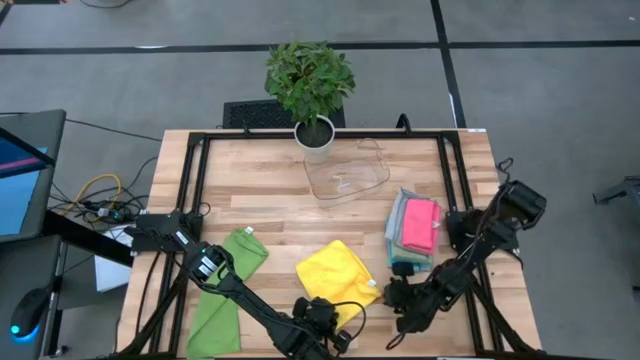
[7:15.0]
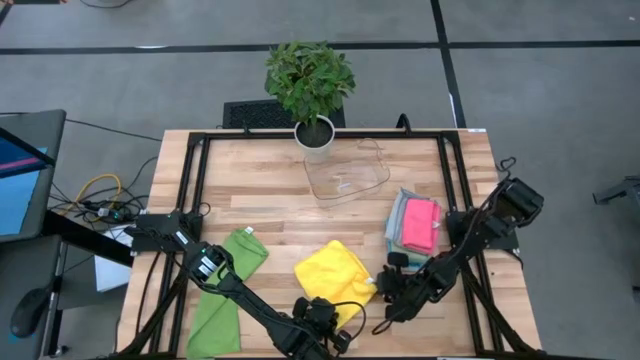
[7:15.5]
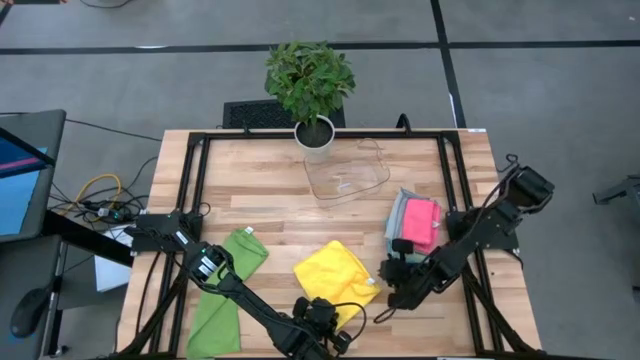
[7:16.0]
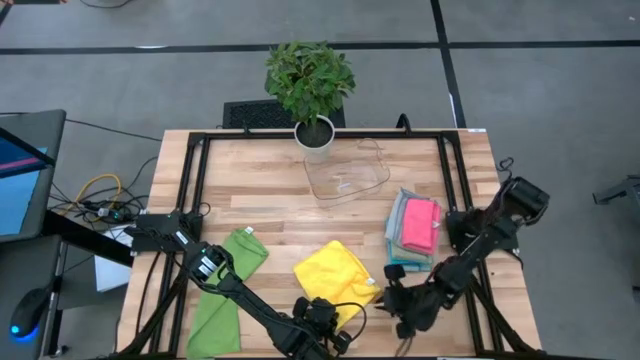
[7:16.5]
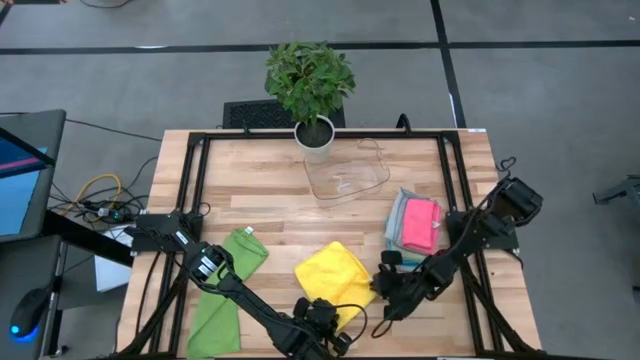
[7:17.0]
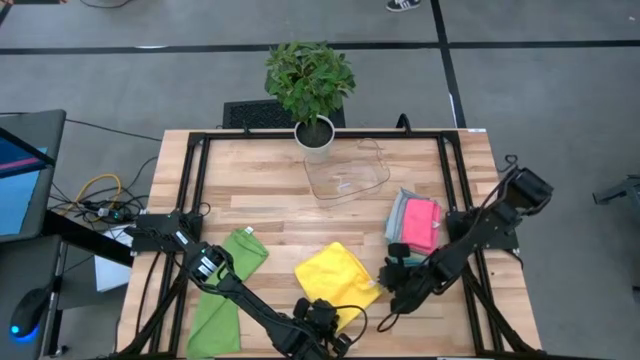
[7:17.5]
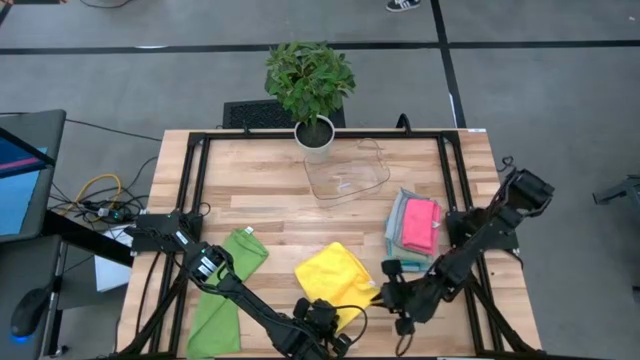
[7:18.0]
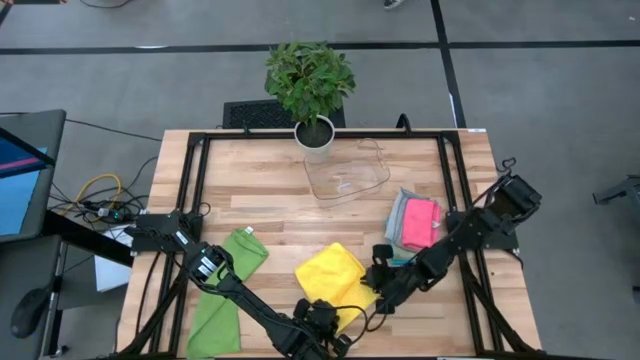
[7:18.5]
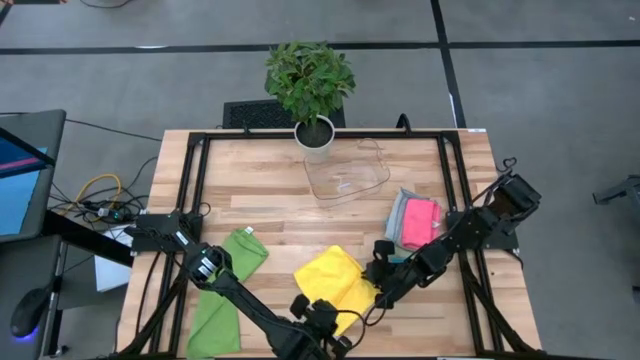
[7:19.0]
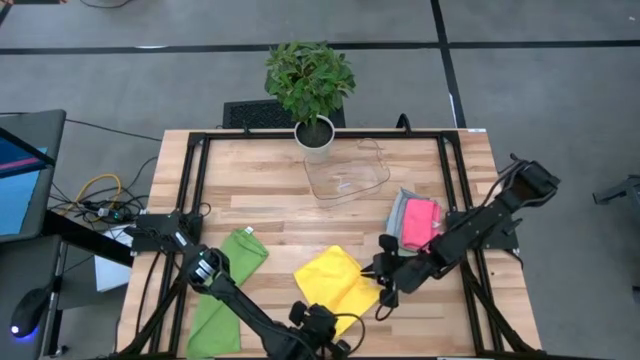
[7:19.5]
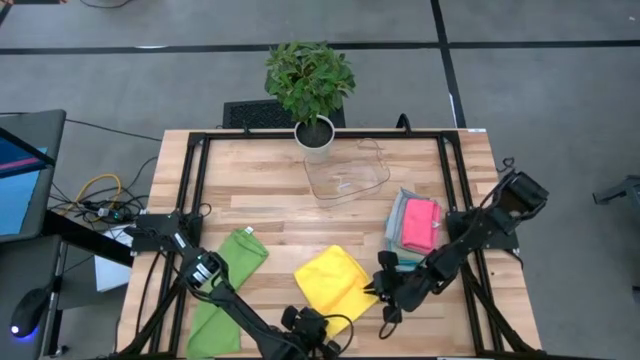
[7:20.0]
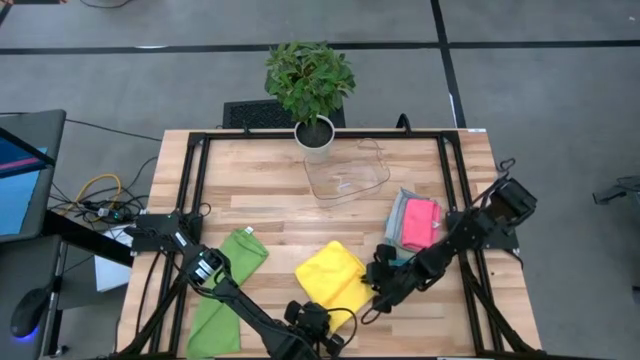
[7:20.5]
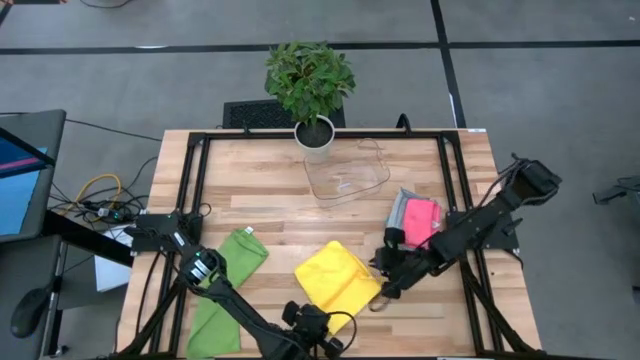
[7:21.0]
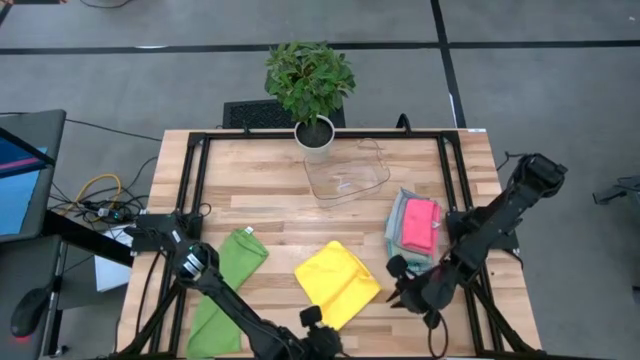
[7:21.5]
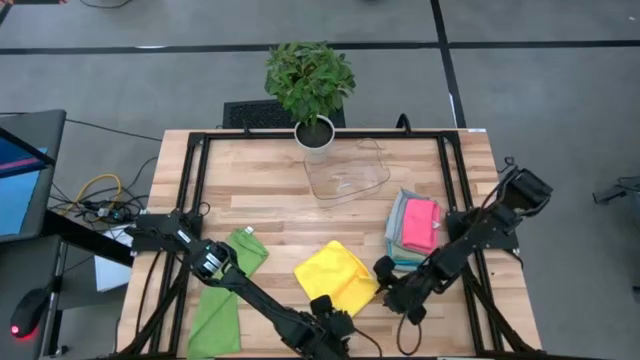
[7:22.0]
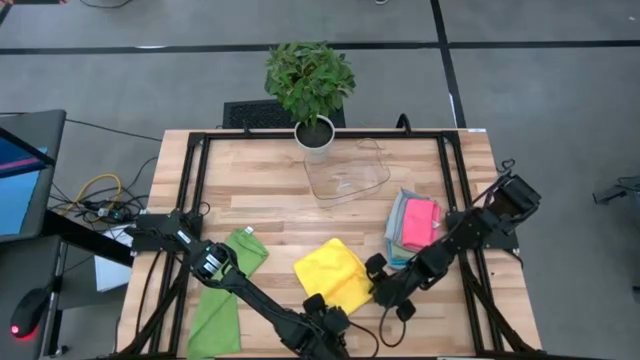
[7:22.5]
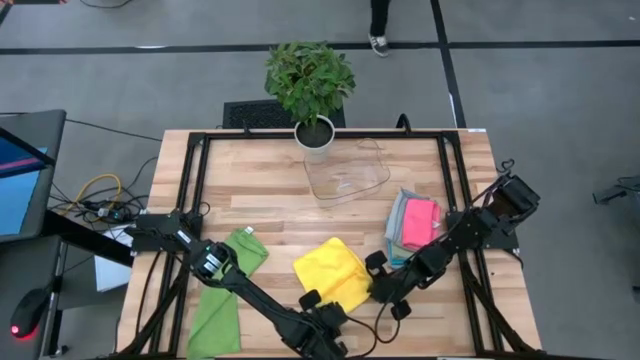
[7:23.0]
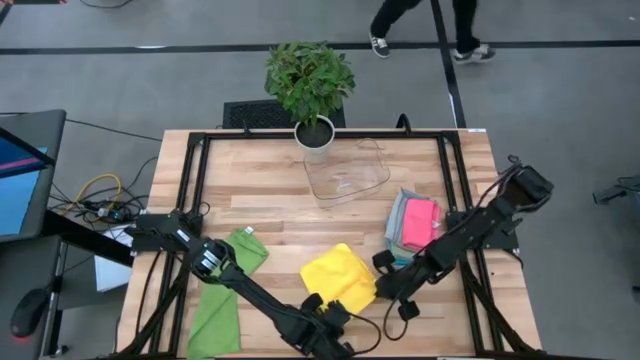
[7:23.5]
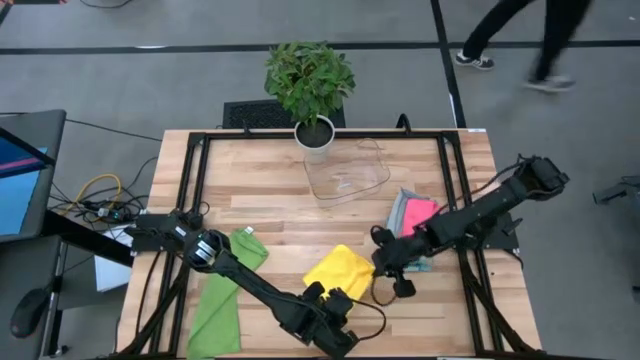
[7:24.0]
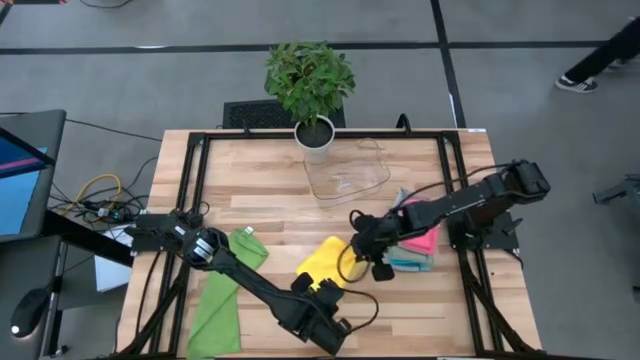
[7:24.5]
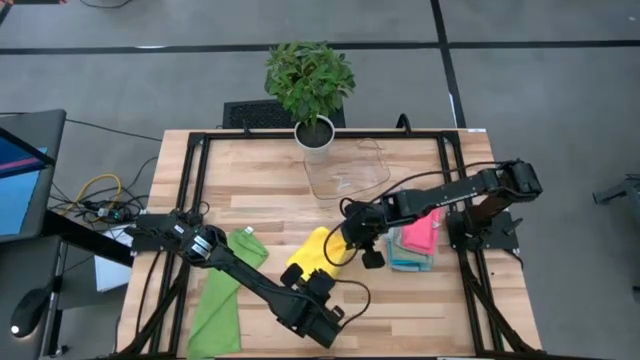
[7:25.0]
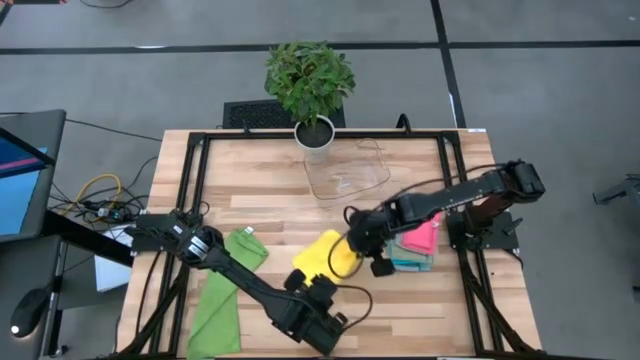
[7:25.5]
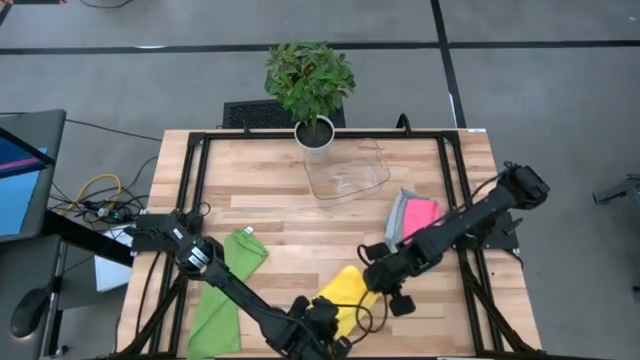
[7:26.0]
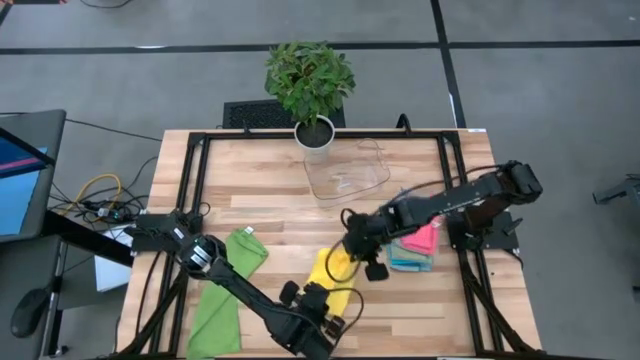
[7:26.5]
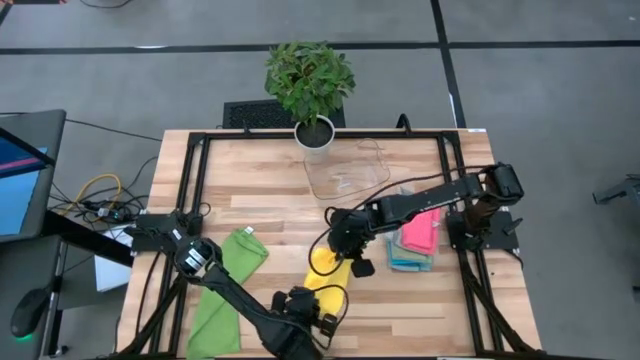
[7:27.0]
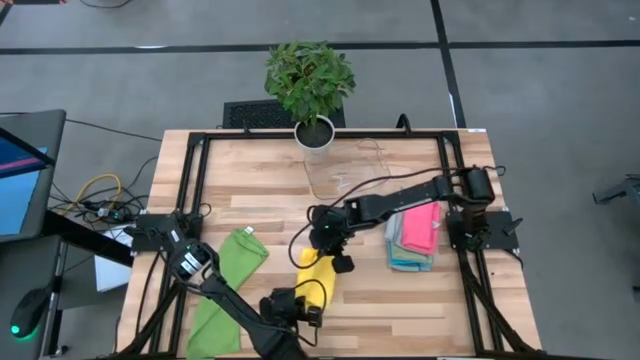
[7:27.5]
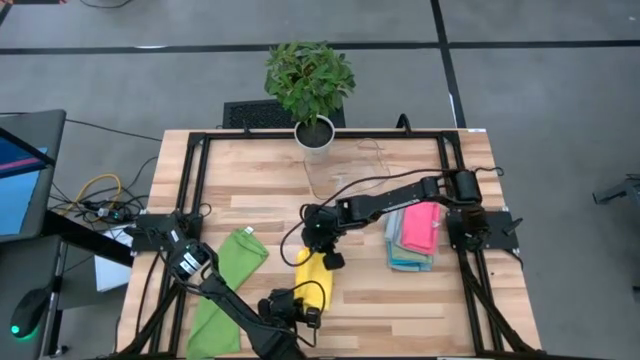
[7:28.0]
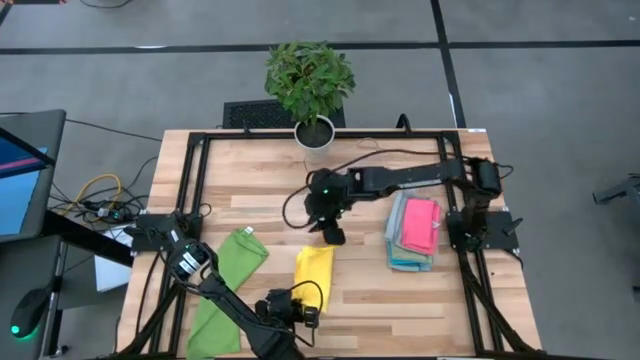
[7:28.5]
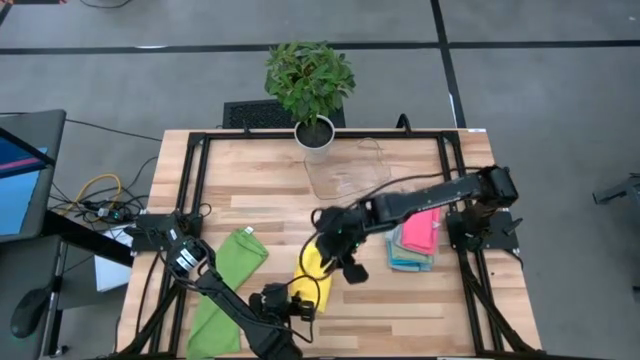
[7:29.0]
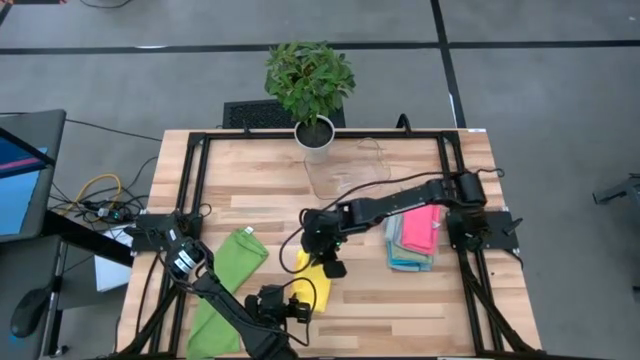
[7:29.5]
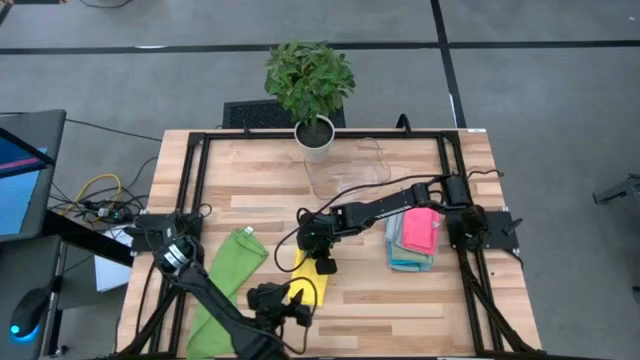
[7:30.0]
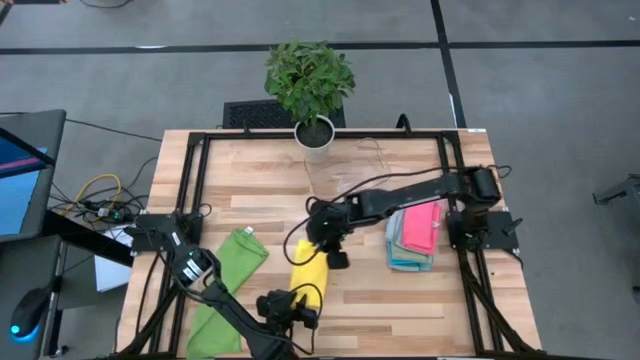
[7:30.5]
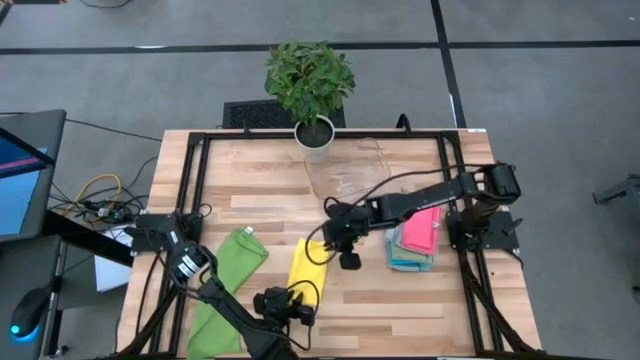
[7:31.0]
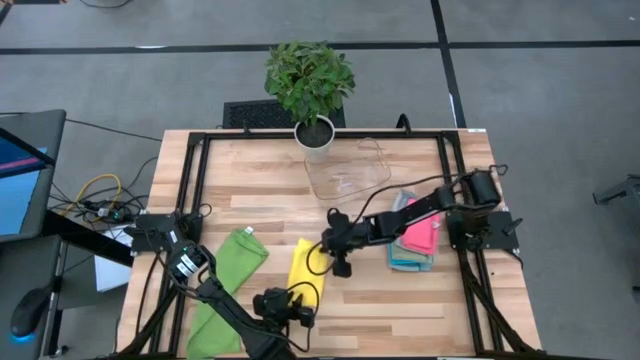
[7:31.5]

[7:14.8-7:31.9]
Task: Fold microfiber towels
Fold the yellow microfiber cloth
